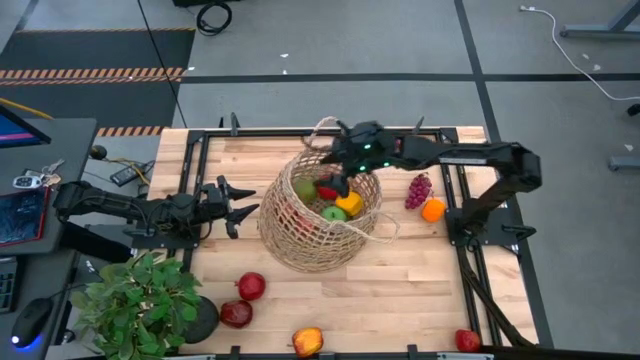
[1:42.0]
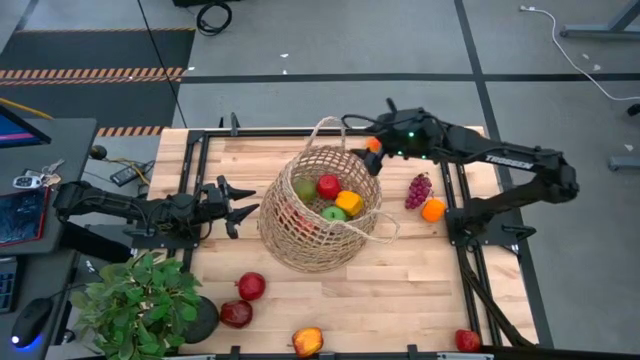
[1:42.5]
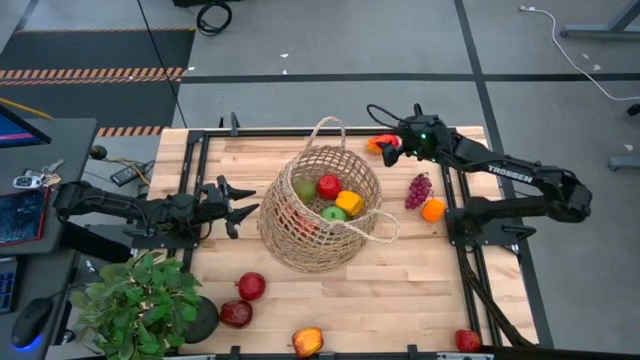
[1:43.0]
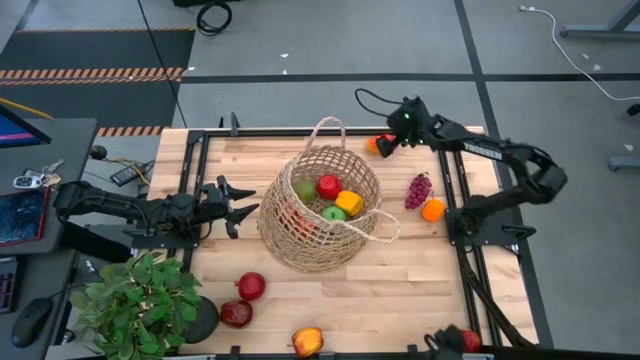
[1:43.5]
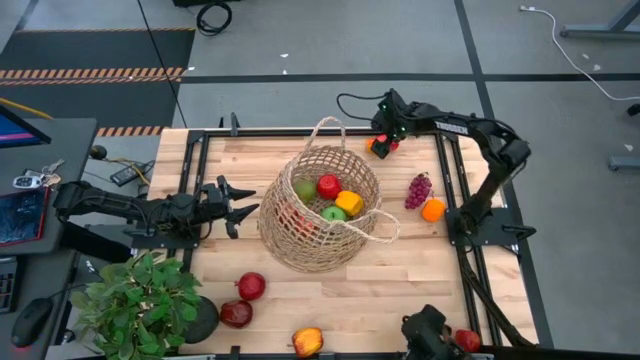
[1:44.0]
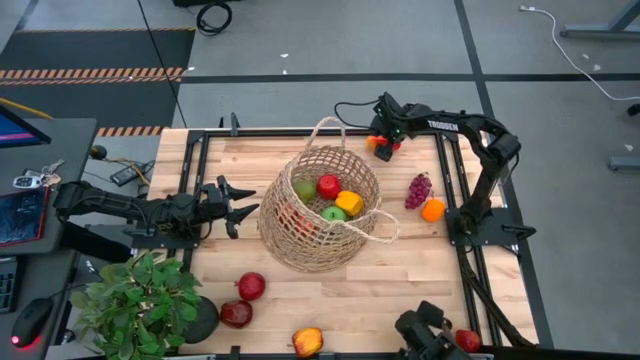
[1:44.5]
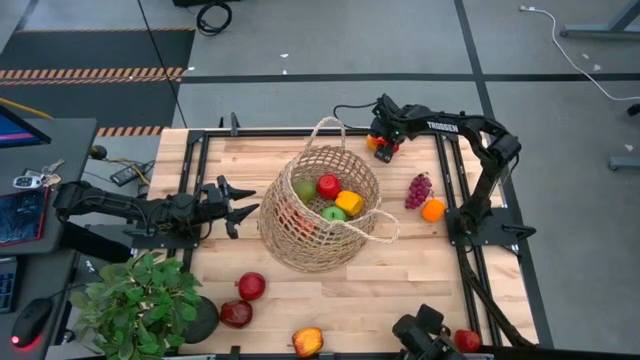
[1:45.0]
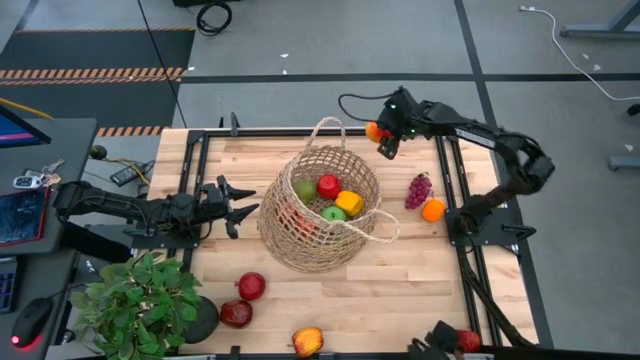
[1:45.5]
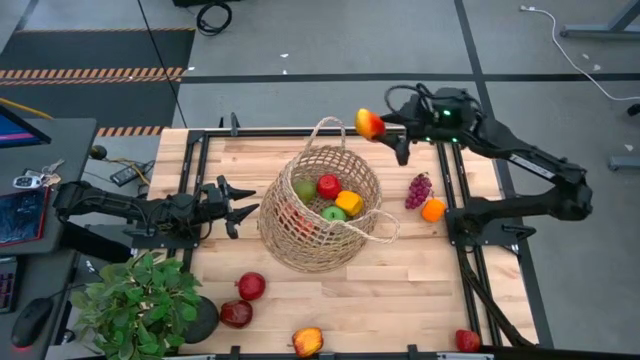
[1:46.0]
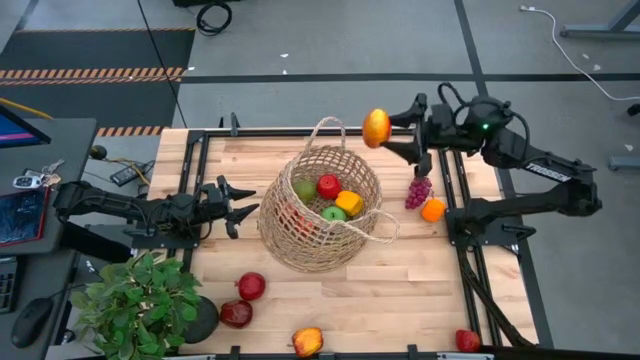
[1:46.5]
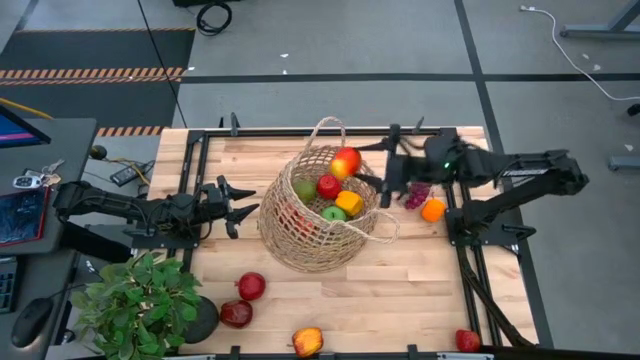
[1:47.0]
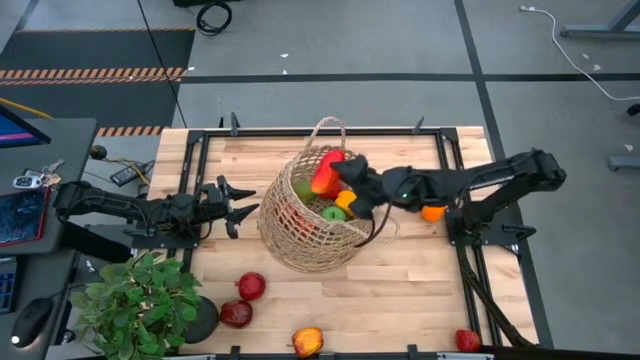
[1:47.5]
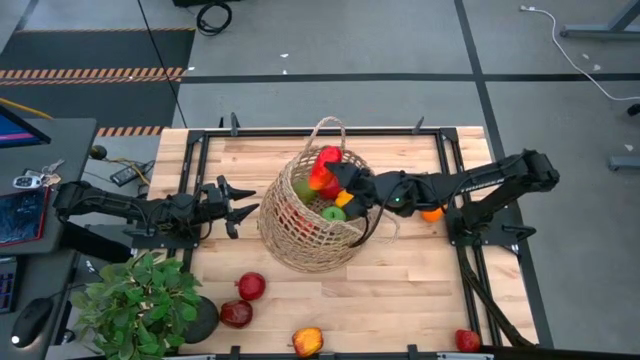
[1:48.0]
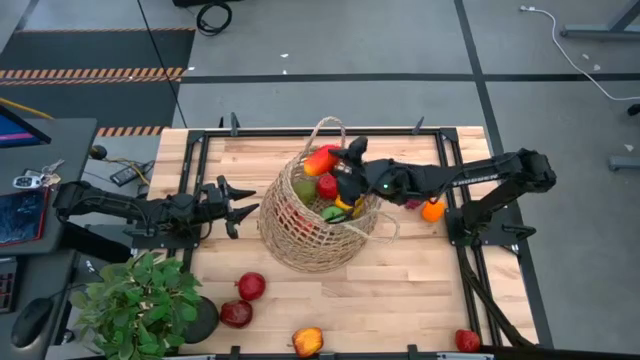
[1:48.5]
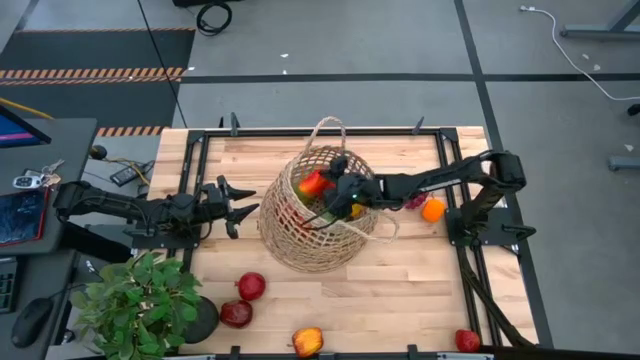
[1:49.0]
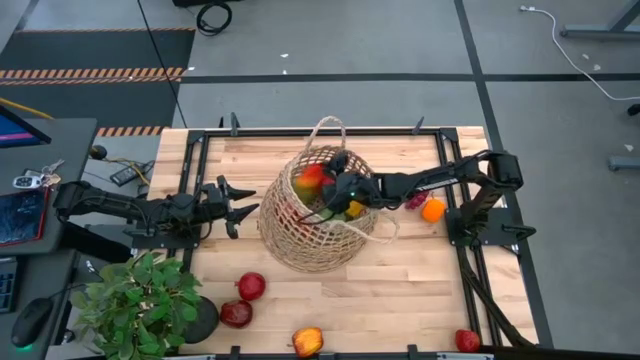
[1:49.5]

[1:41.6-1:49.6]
Task: Build produce basket
Put the mango into the basket

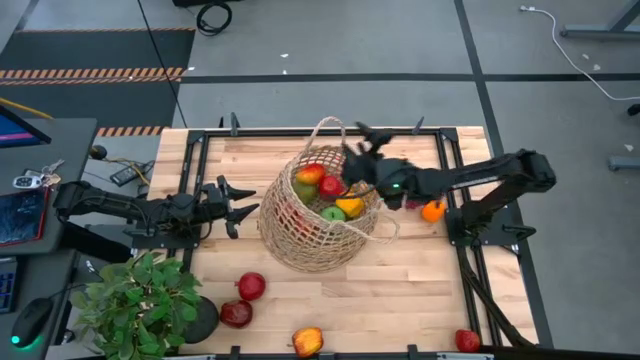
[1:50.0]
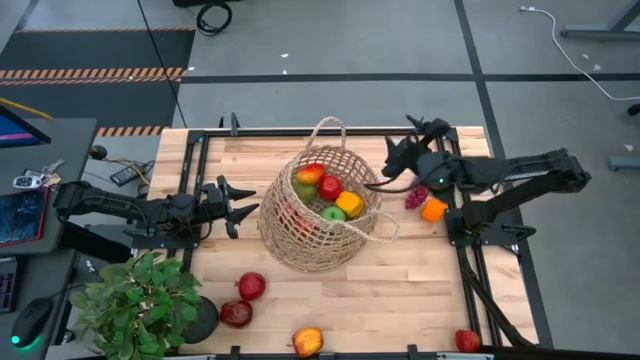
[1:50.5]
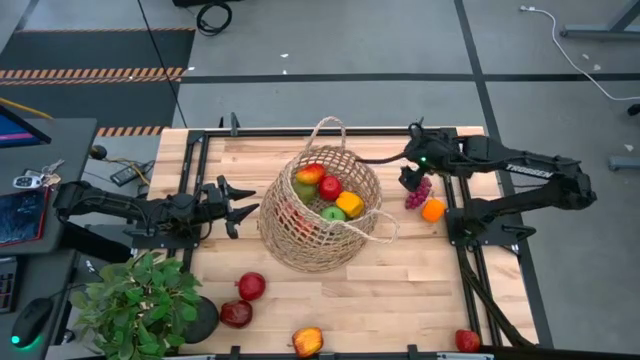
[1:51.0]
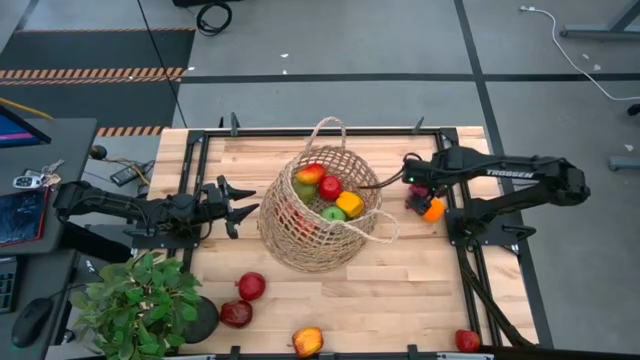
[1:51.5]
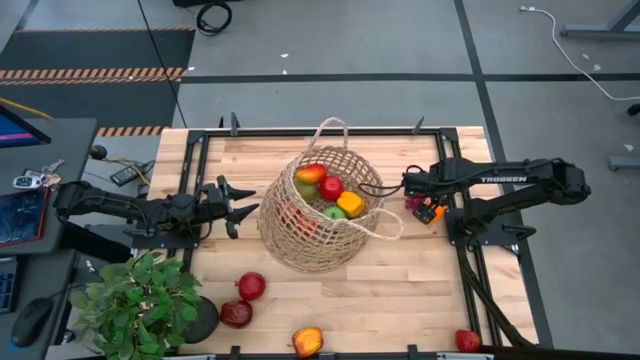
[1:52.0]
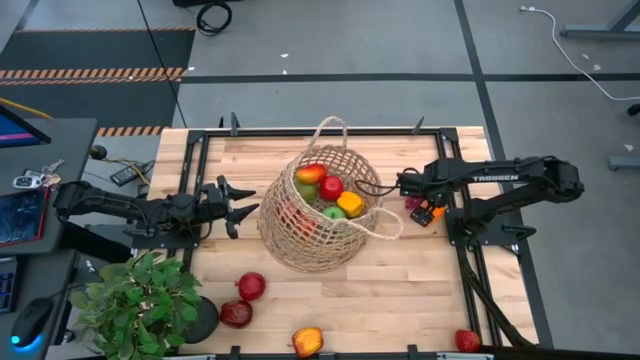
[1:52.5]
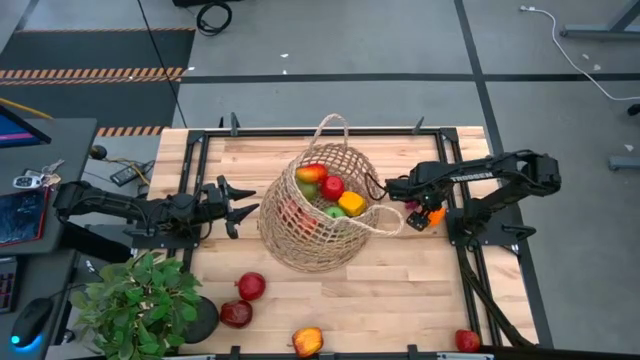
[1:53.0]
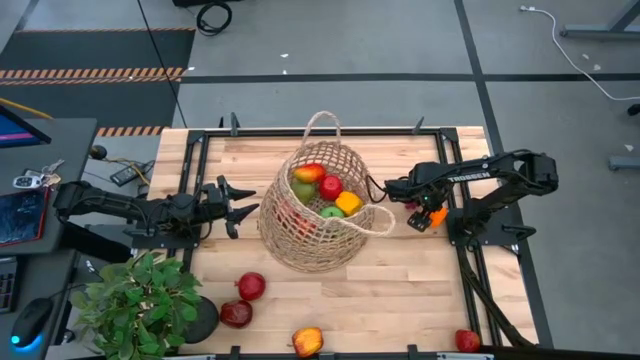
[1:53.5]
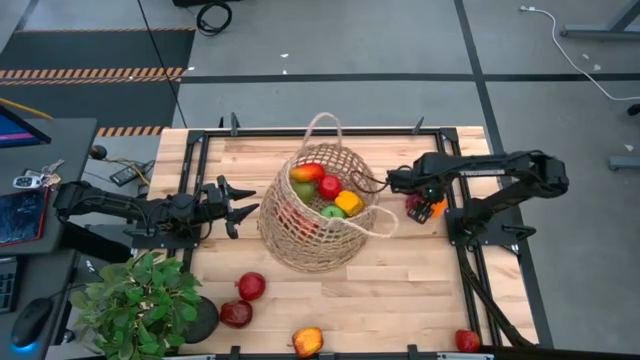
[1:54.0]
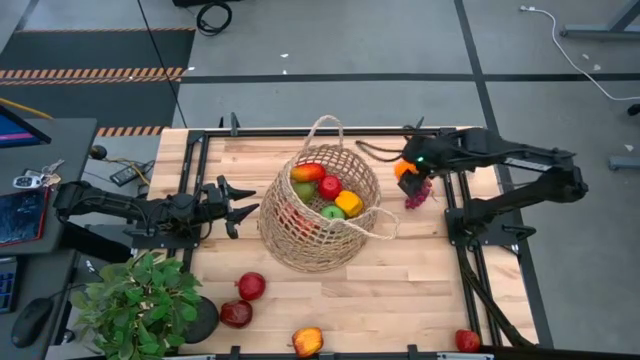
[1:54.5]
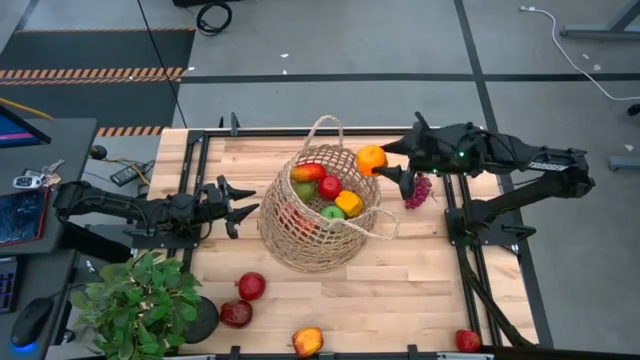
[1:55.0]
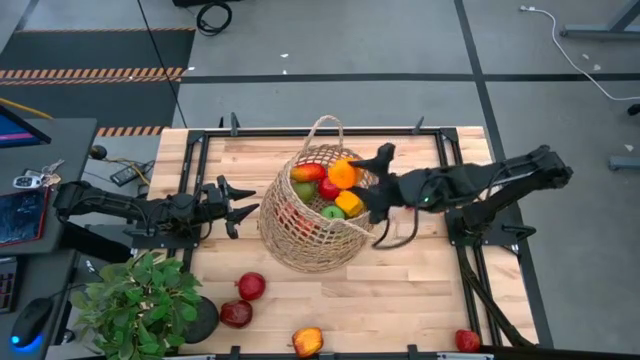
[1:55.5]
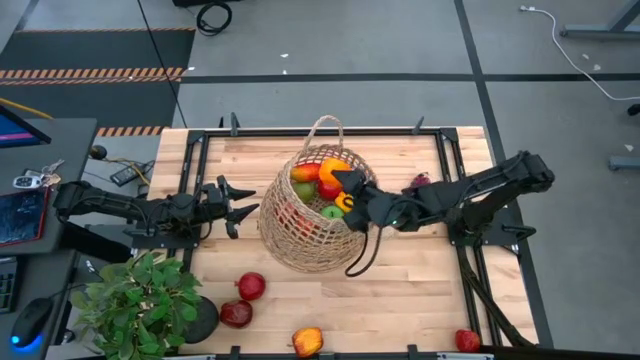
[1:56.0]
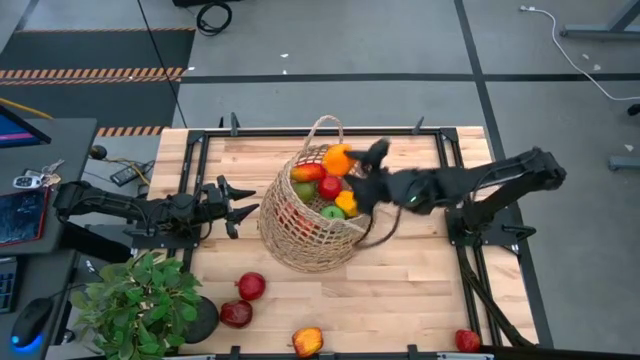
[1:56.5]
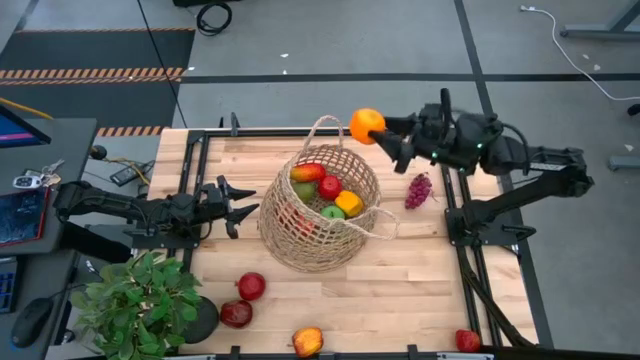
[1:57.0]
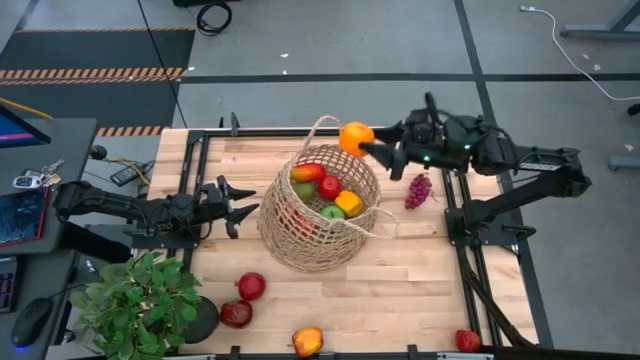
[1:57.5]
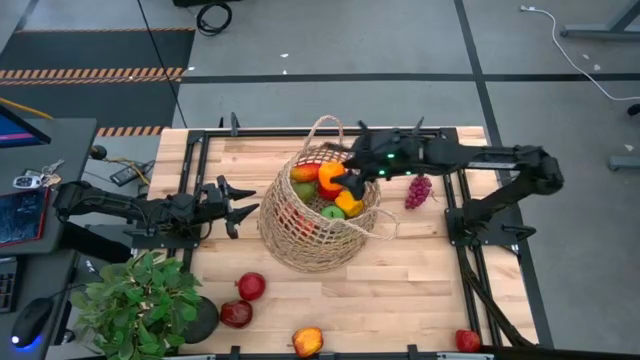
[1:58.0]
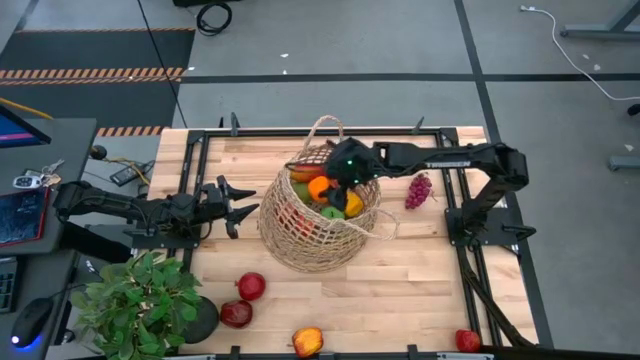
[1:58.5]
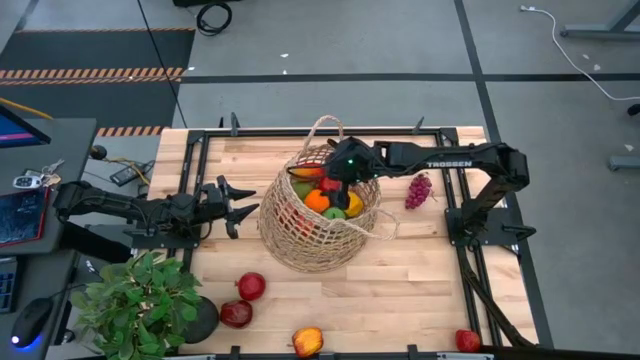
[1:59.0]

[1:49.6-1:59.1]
Put the orange into the basket

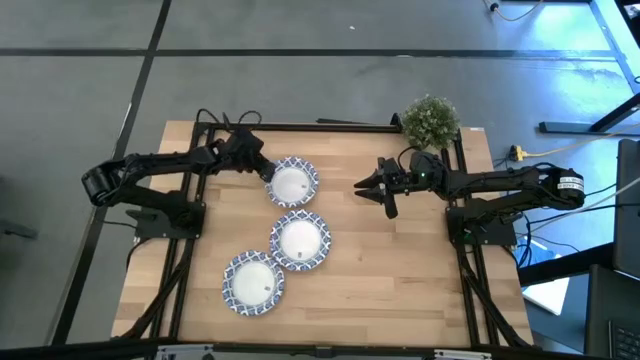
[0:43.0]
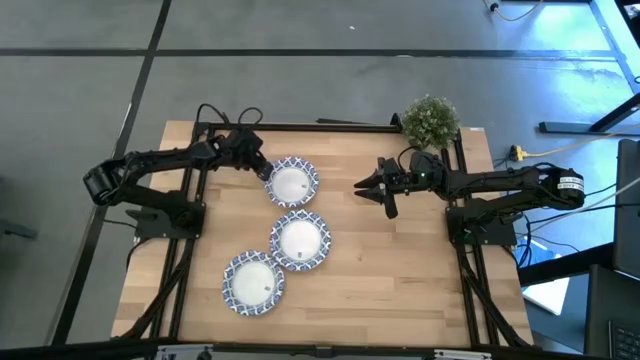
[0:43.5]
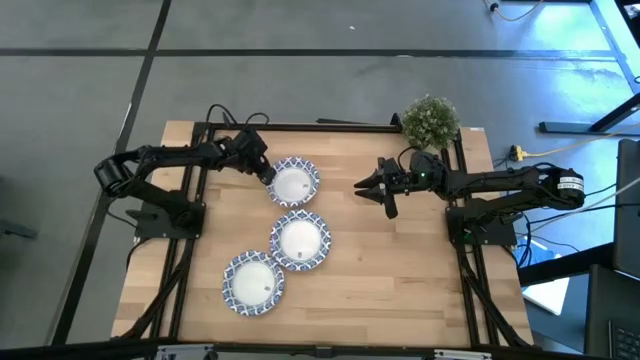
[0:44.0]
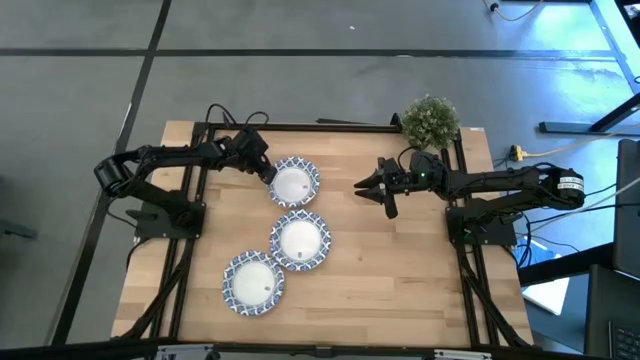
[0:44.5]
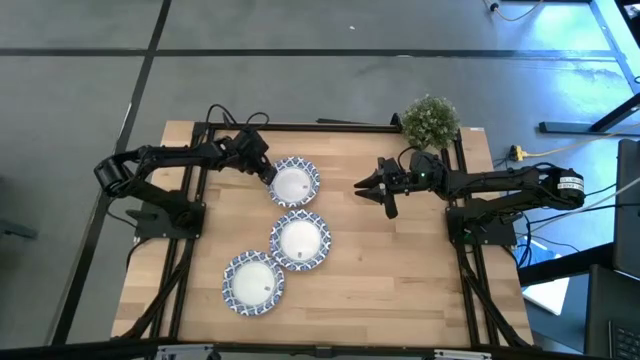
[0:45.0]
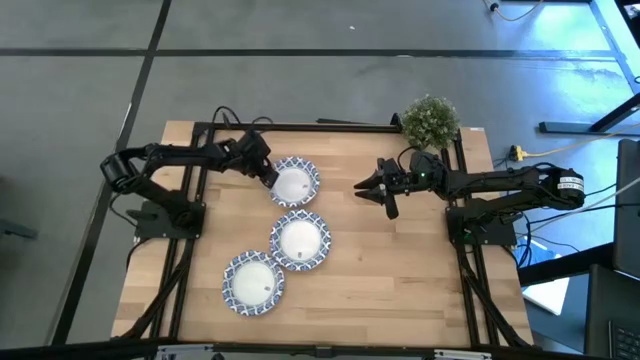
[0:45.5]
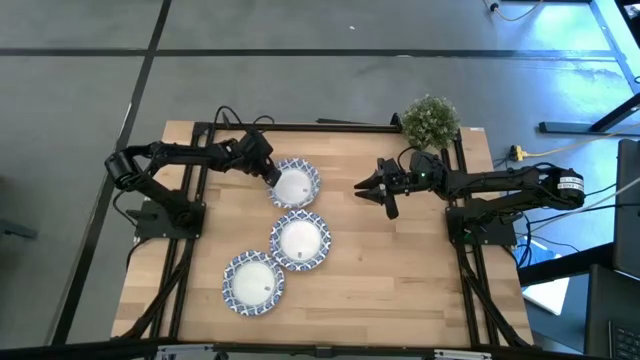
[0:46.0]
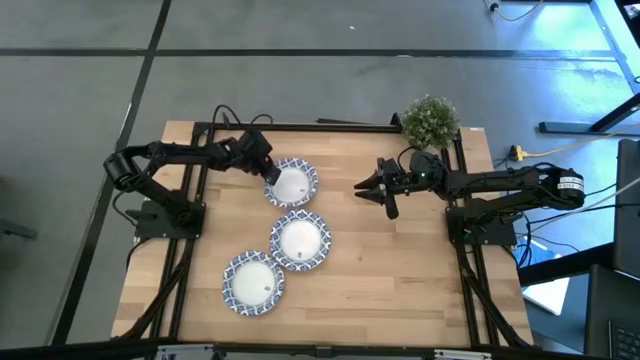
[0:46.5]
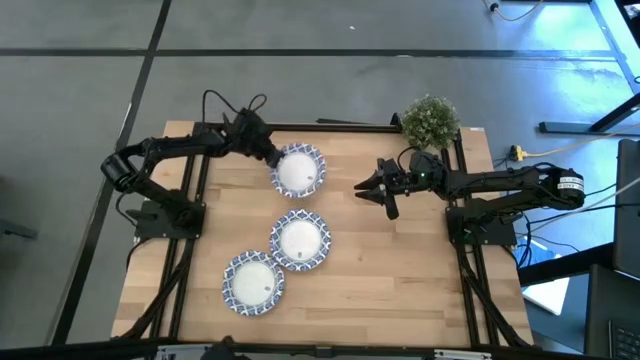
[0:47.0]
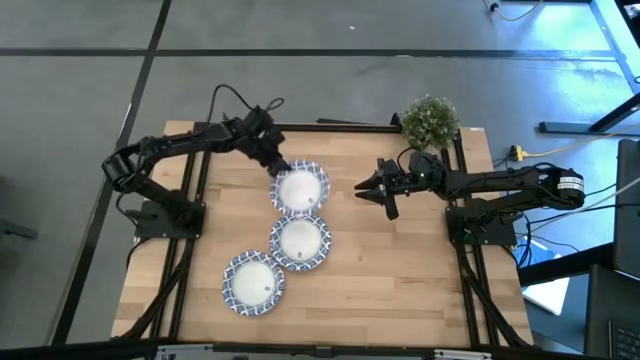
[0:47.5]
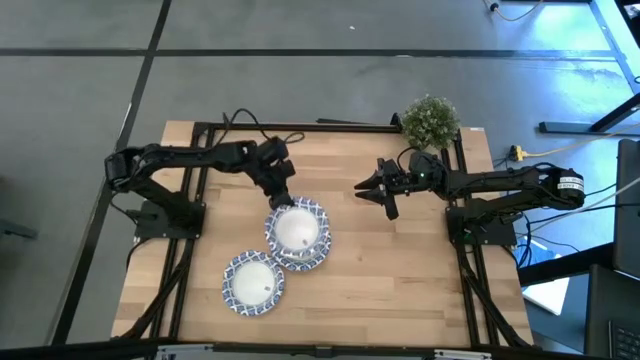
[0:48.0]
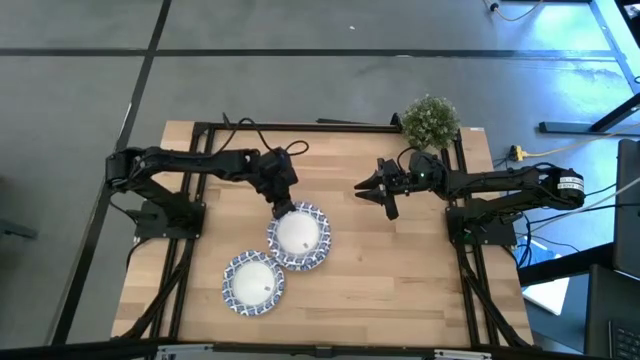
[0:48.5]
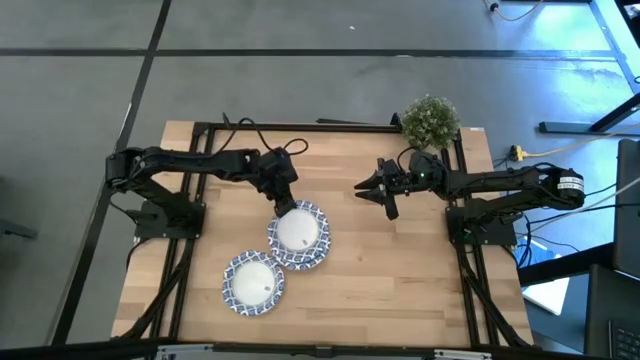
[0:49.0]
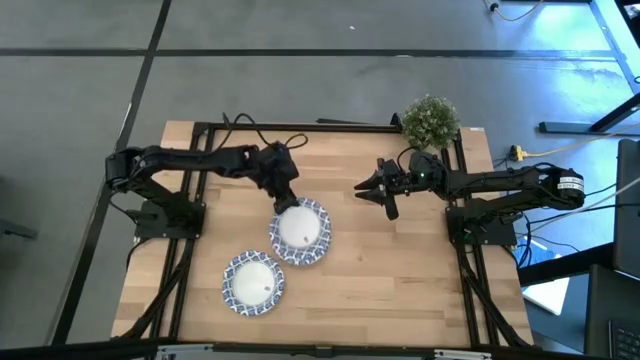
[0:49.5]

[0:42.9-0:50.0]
Task: Nest bowls inside each other
Stack the white patterned bowl on top of the other white patterned bowls
